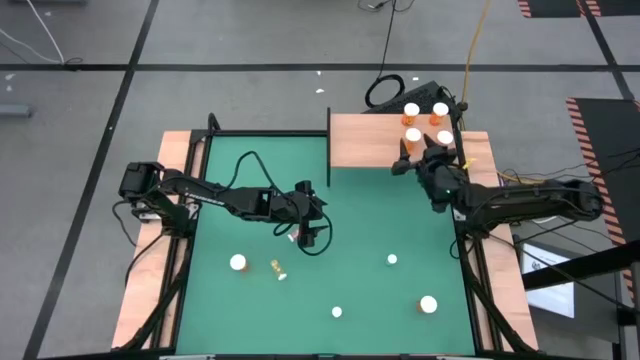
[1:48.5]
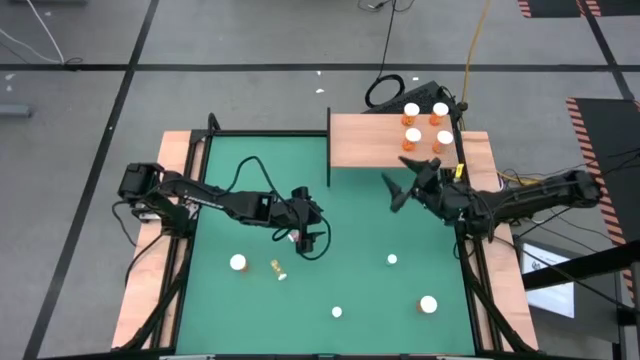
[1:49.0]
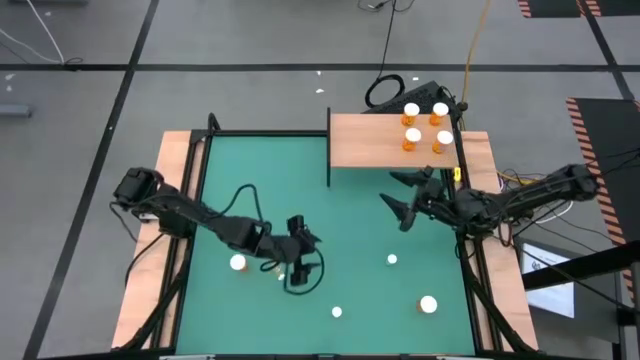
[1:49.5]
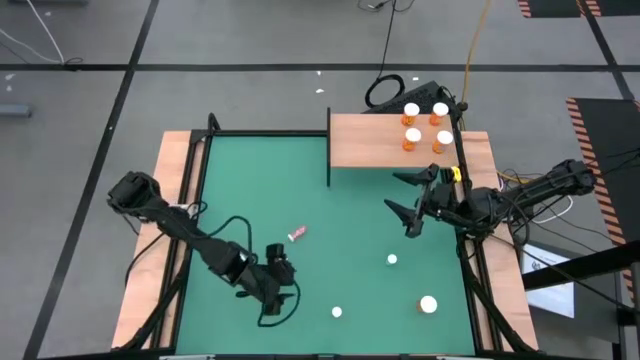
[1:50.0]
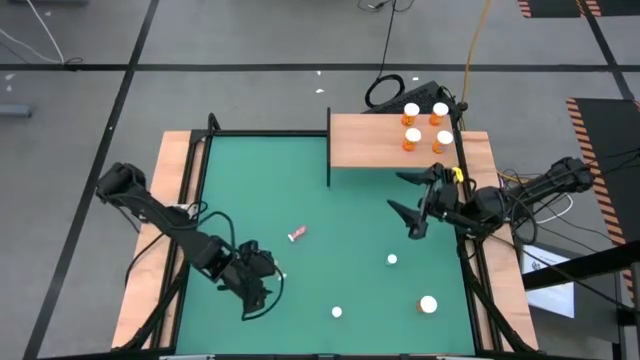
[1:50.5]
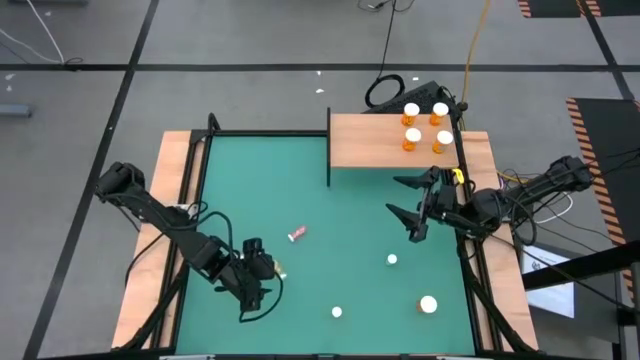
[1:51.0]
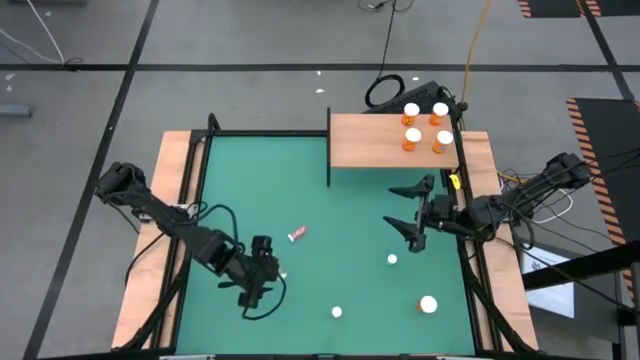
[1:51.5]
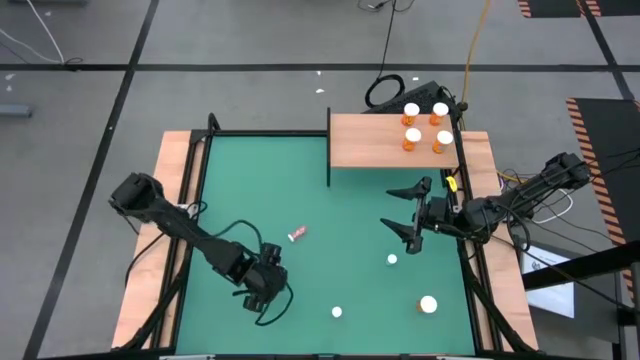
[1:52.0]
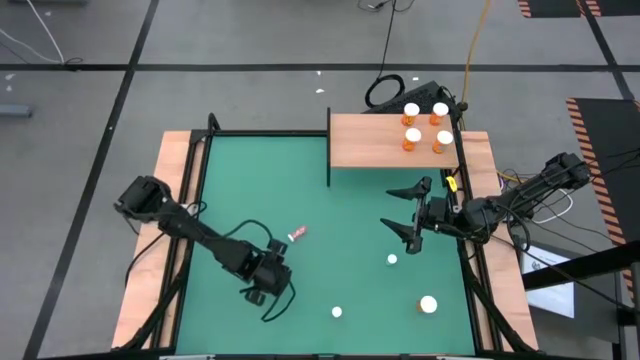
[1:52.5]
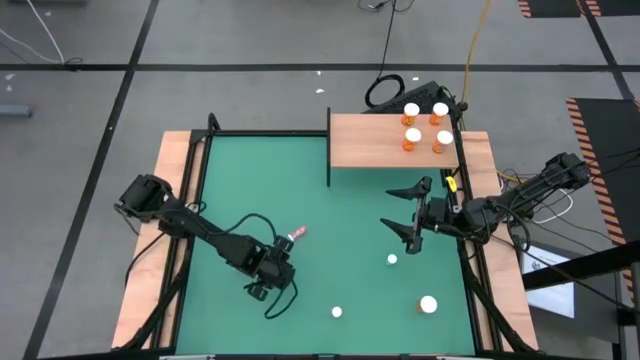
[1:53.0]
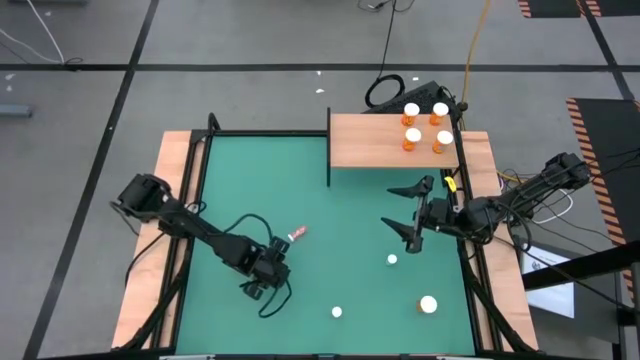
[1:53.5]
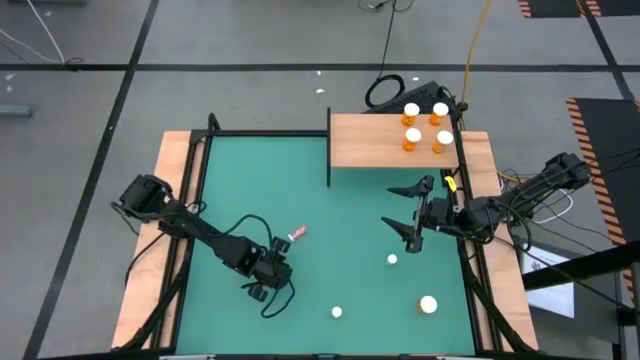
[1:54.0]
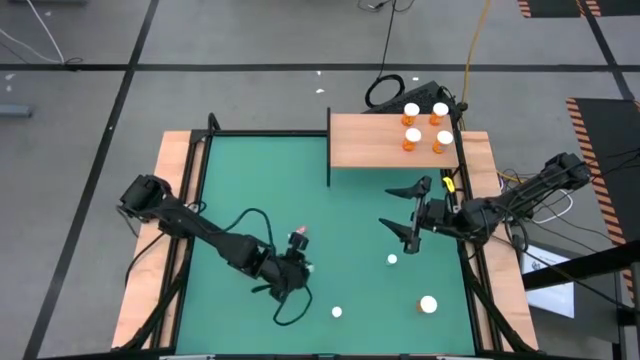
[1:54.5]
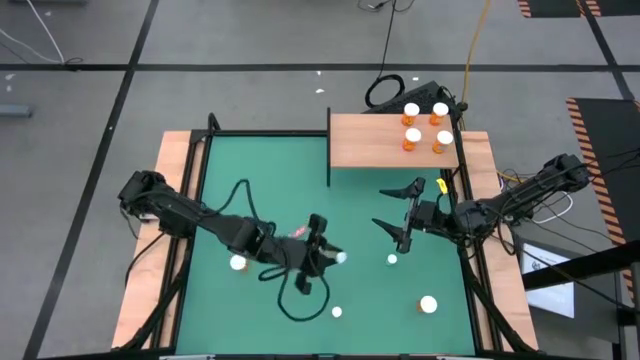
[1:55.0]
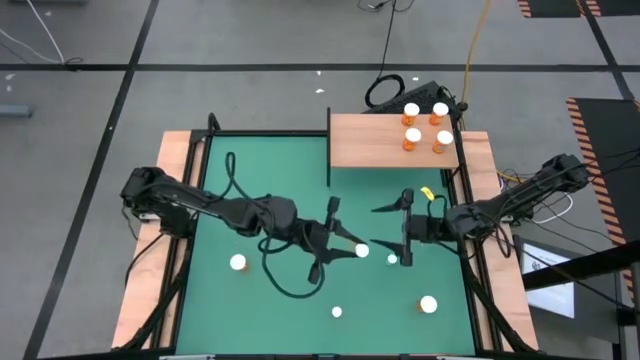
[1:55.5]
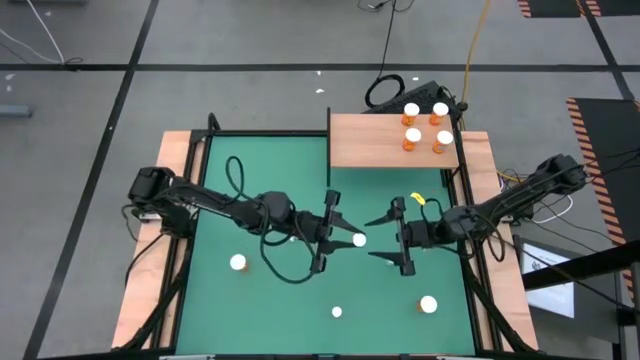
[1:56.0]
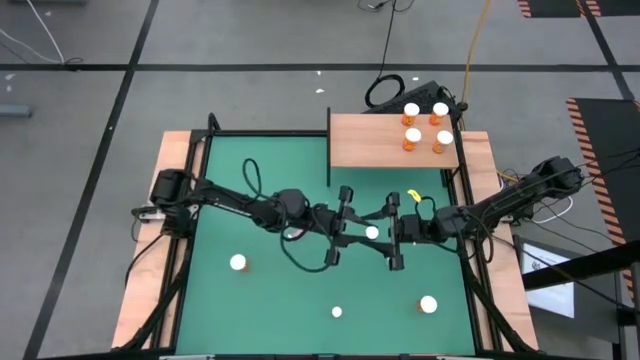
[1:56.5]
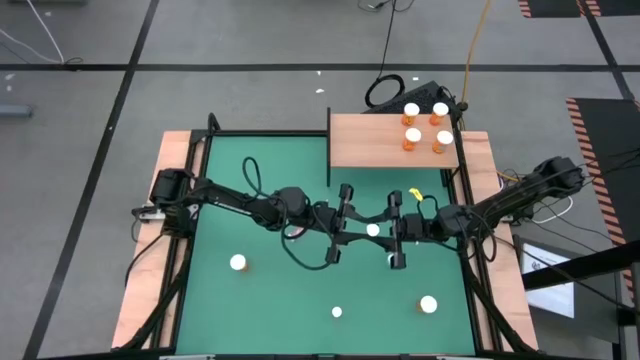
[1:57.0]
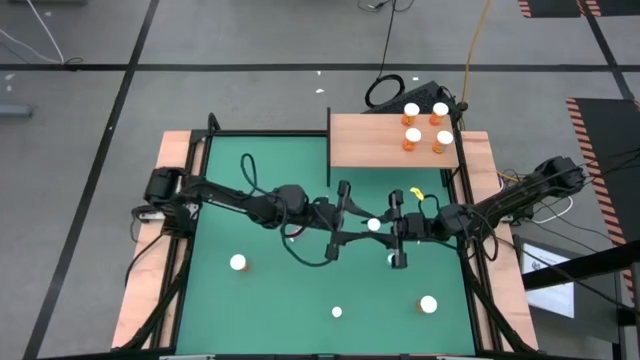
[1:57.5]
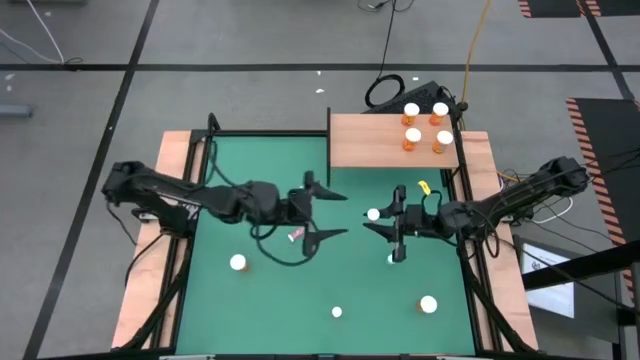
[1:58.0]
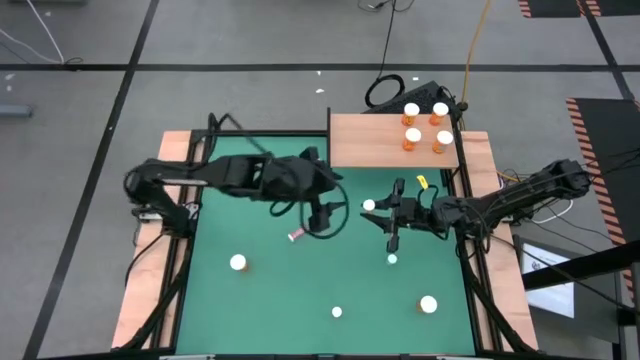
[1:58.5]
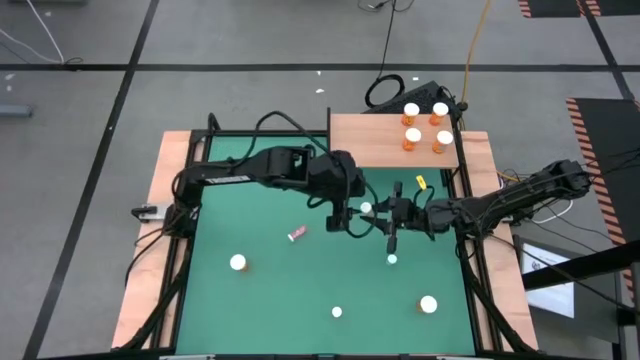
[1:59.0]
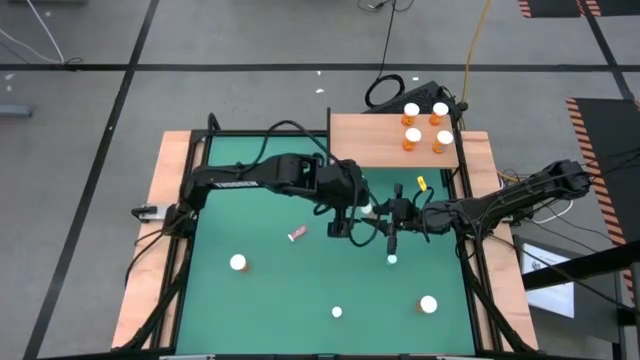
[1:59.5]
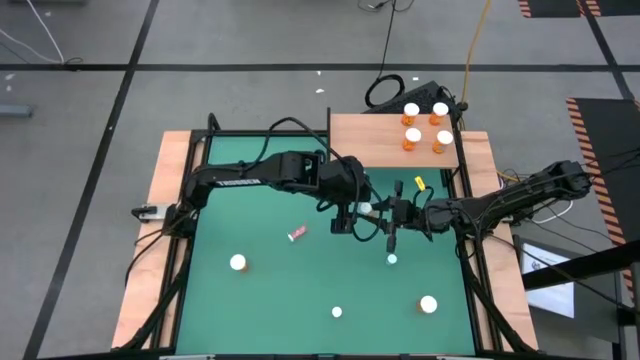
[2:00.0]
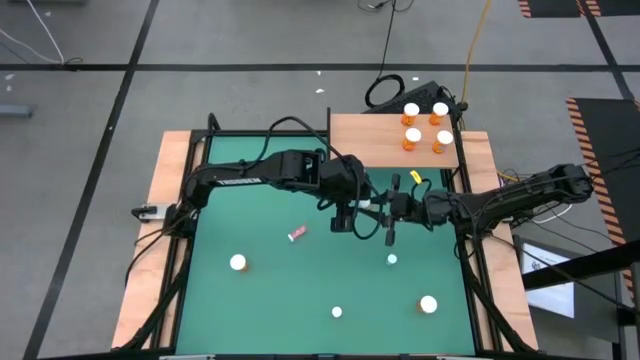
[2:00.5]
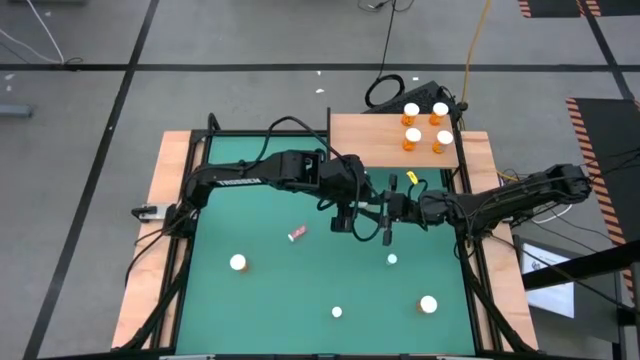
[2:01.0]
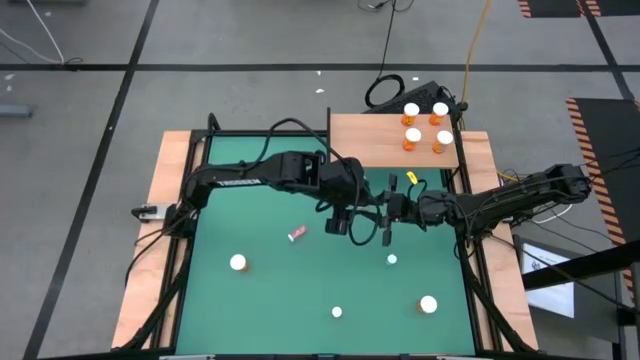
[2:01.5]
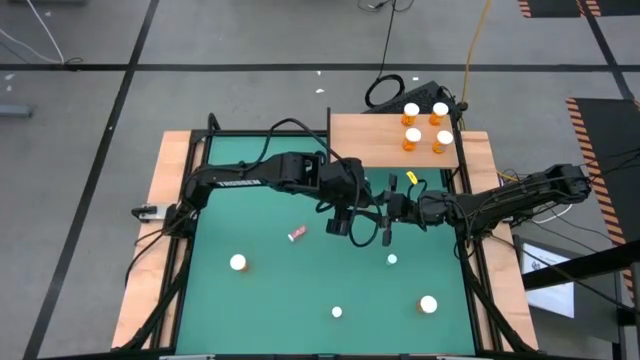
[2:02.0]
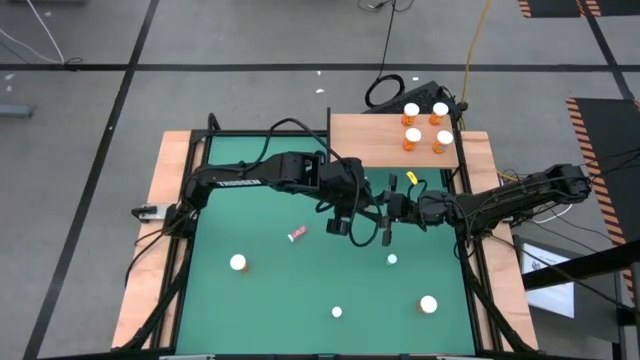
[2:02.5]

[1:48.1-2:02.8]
Task: Pick and place medicine bottles onto shelf by color
Put the yellow pill bottle on the shelf

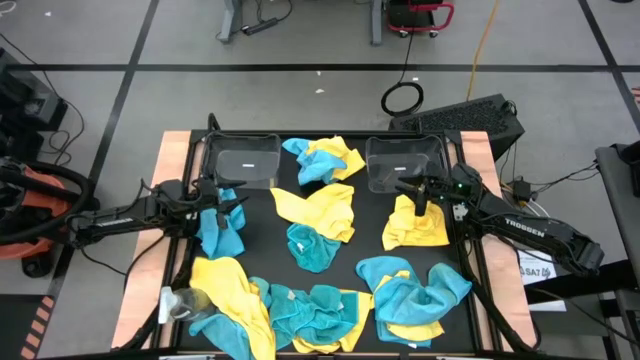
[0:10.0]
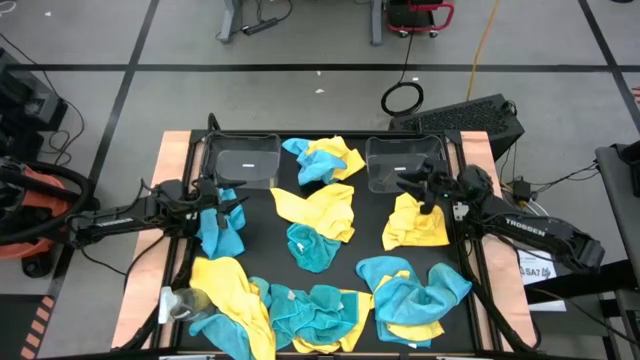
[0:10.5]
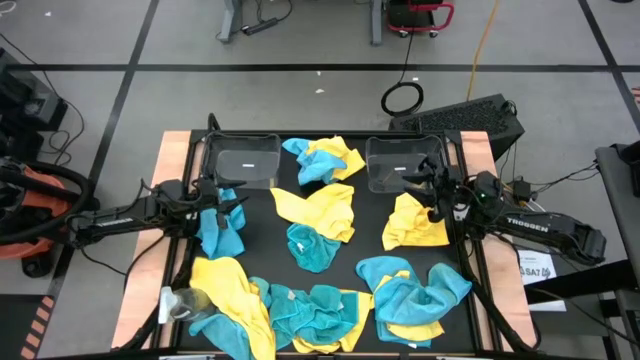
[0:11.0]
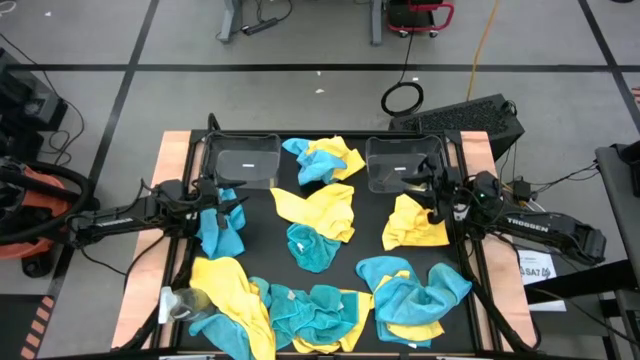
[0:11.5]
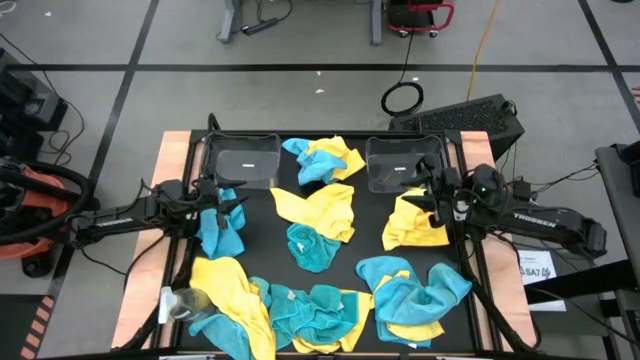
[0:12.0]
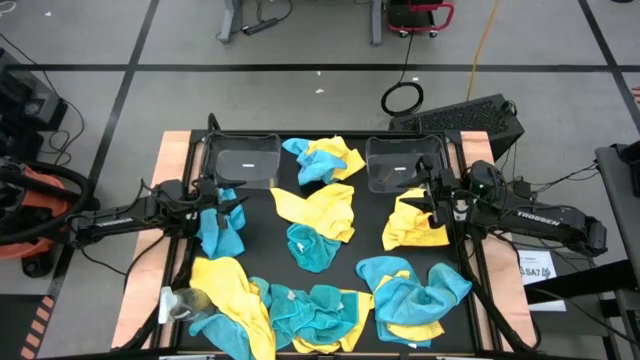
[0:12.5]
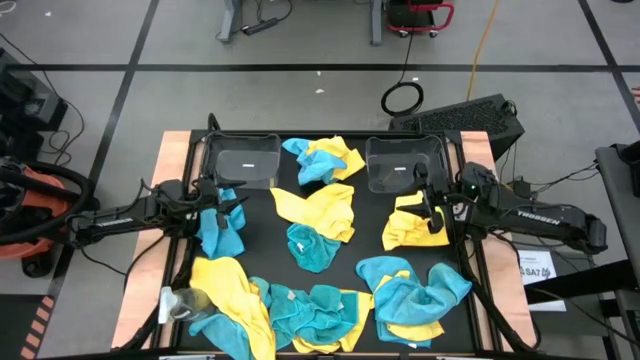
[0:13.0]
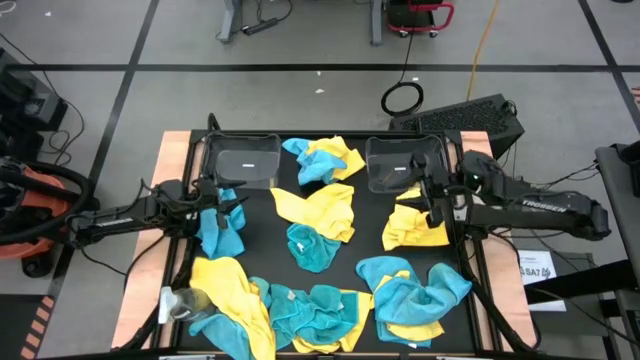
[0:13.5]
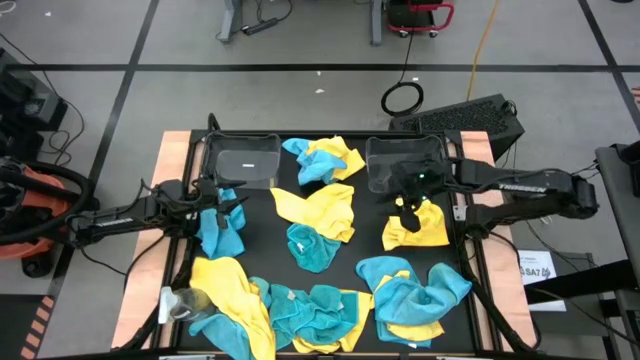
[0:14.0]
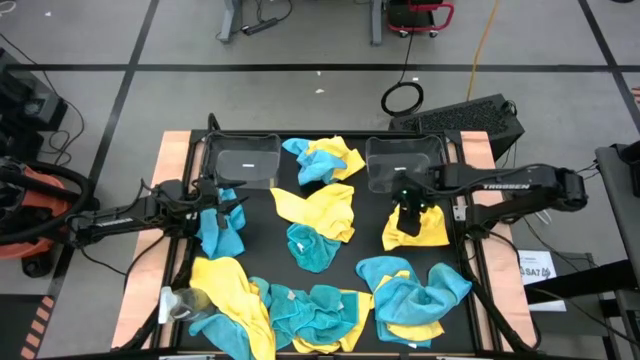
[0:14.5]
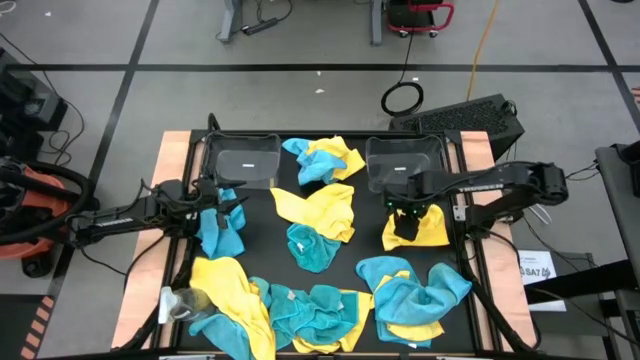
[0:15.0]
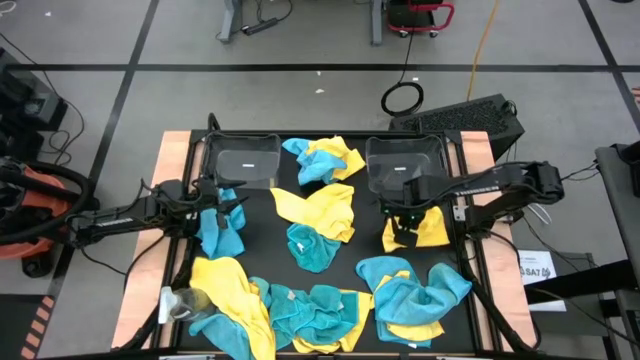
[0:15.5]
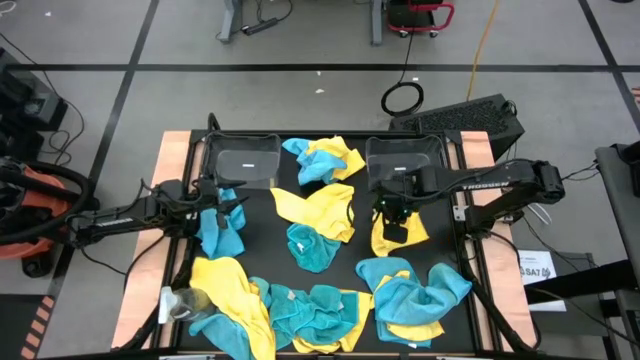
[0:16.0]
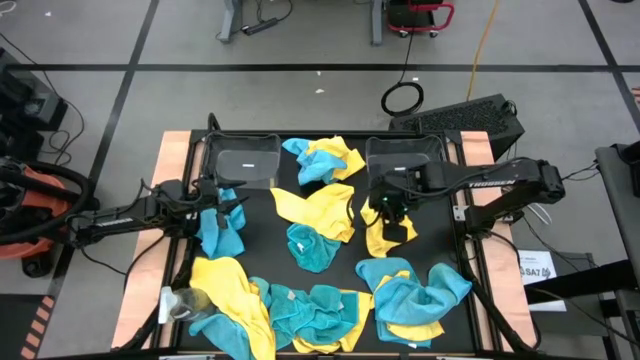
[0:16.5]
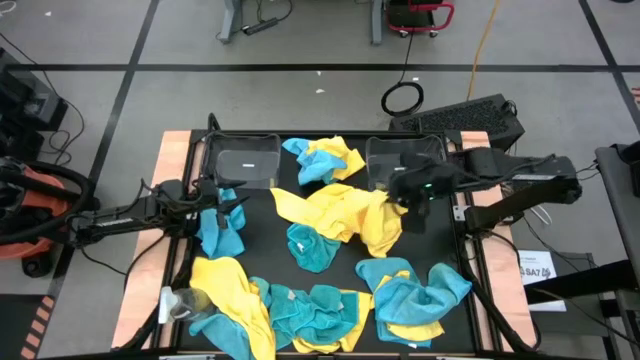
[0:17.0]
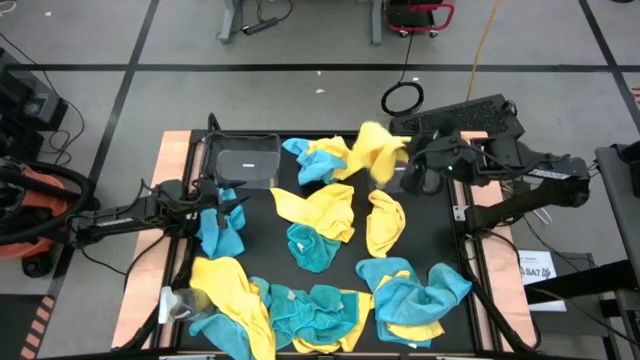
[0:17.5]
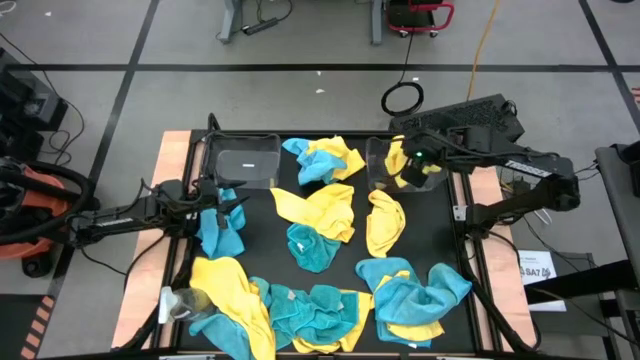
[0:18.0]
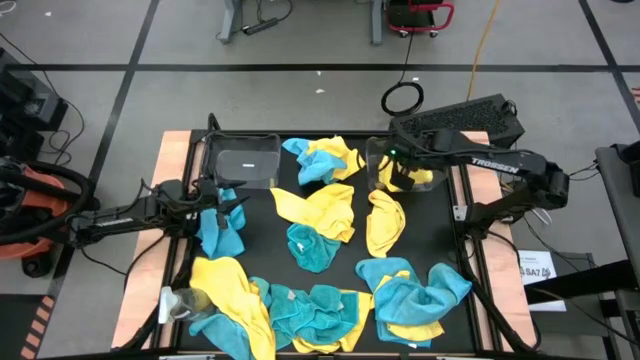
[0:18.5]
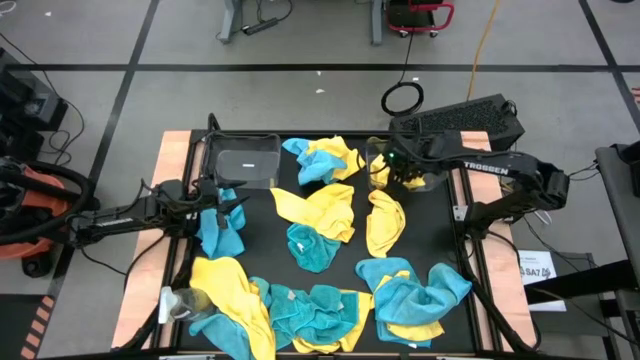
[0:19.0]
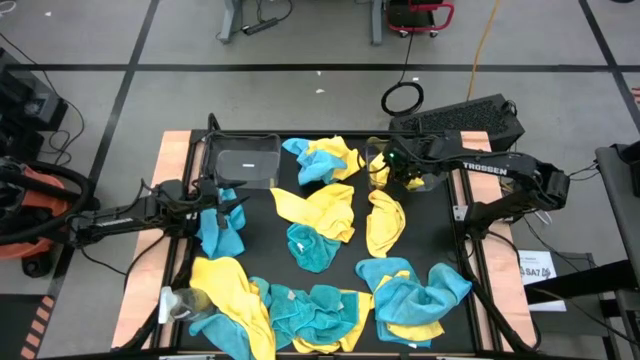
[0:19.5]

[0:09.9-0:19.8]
Task: Sort microfiber towel by color & place in baskets
Put the yellow microfiber cloth into the right transparent bin
